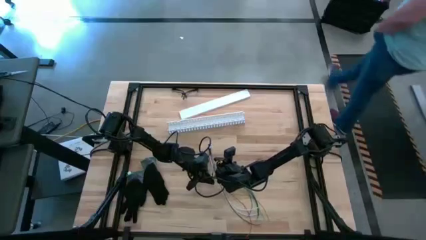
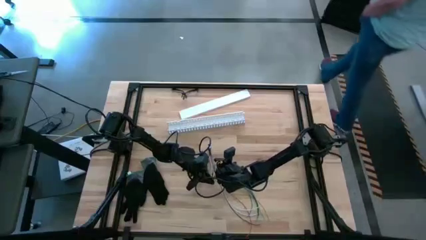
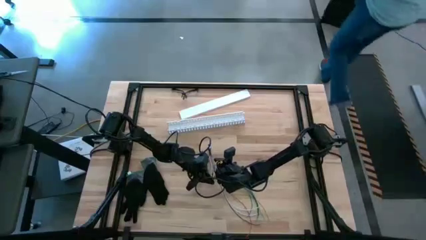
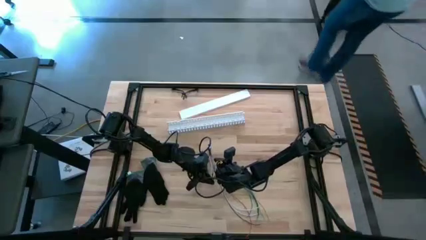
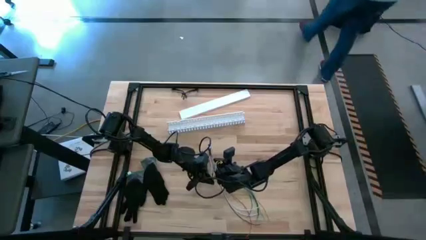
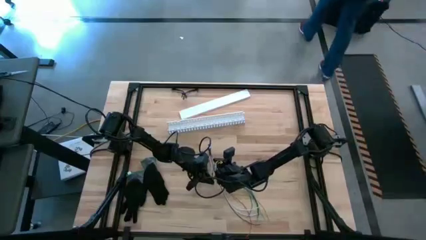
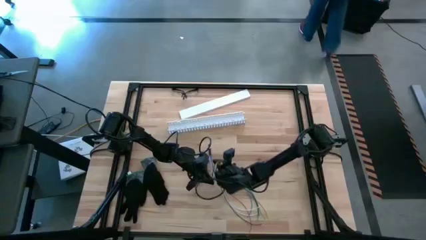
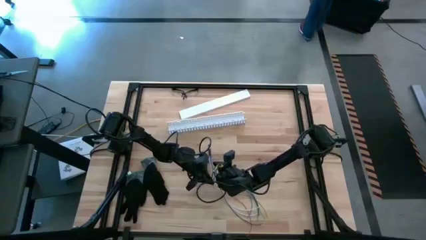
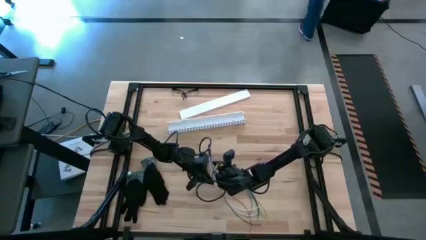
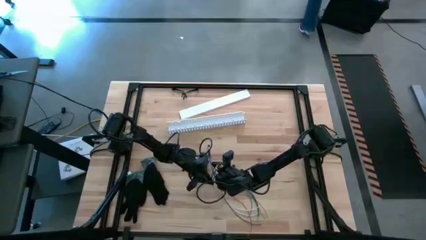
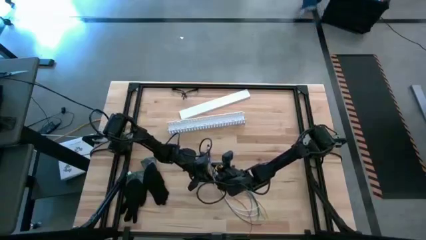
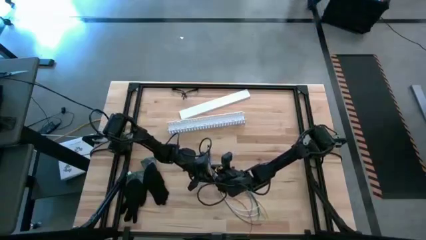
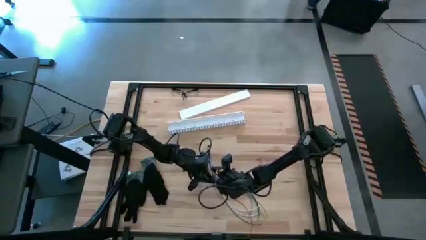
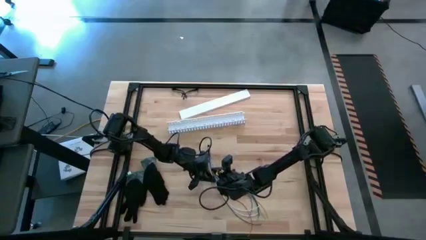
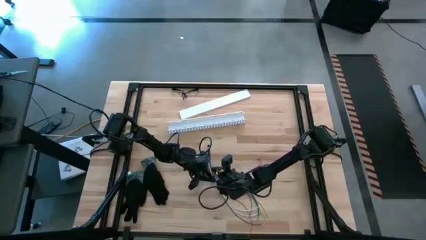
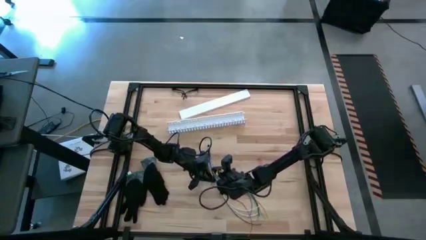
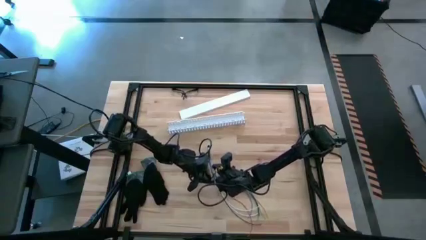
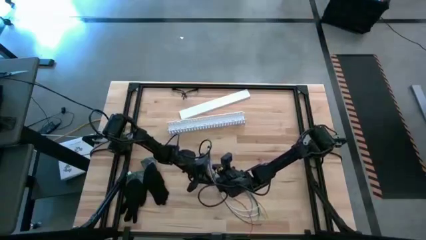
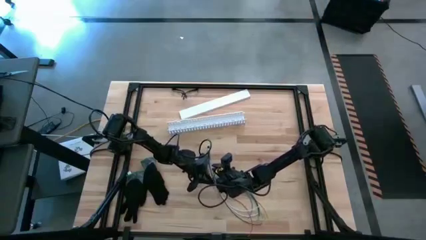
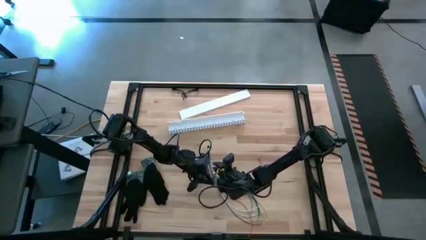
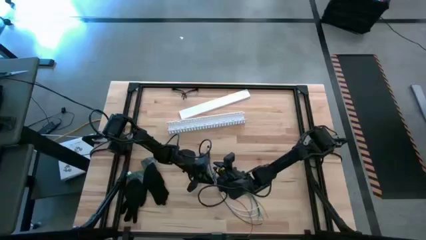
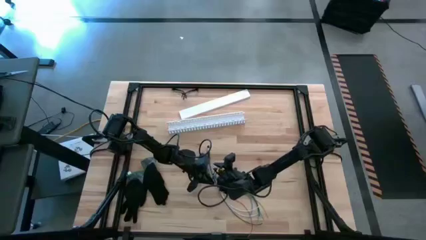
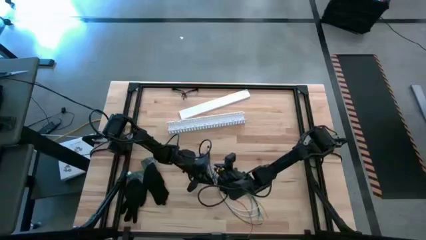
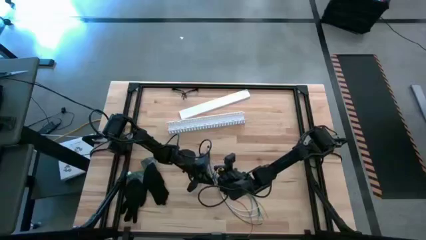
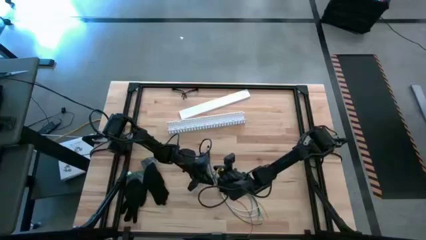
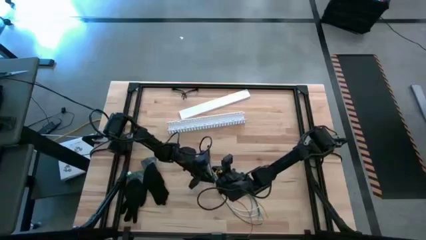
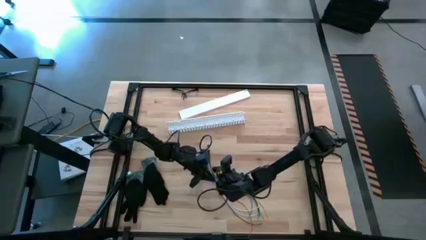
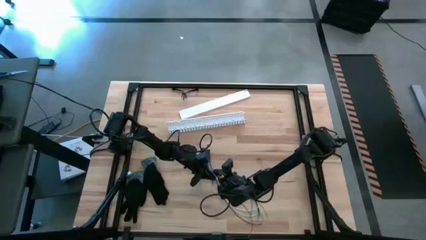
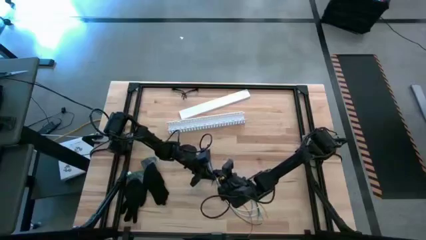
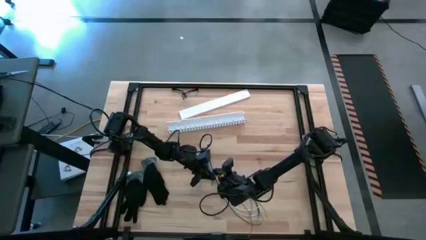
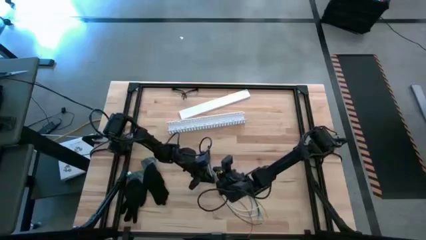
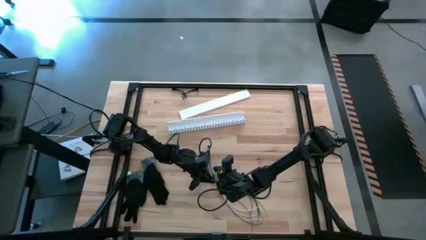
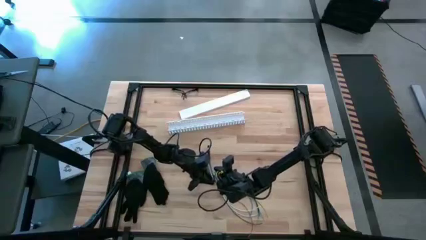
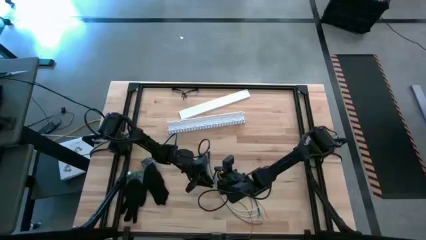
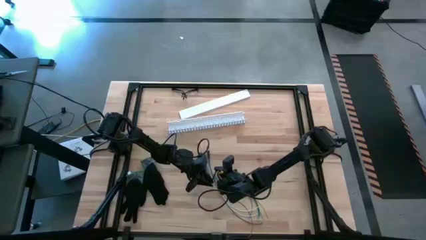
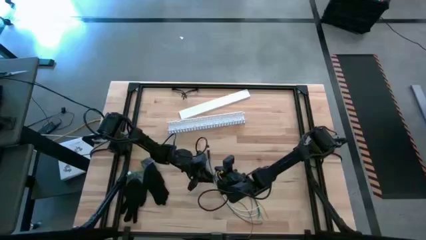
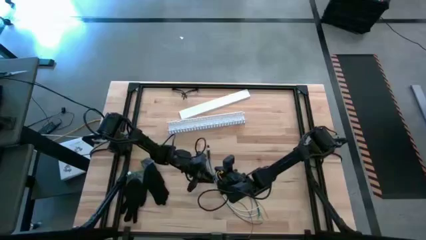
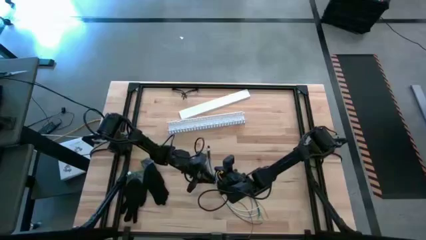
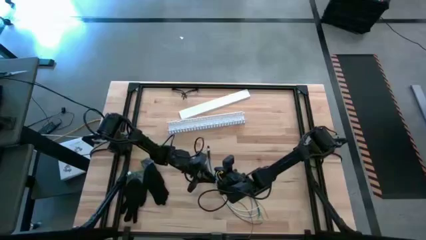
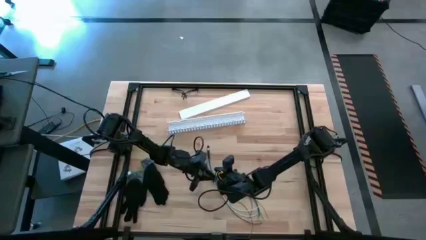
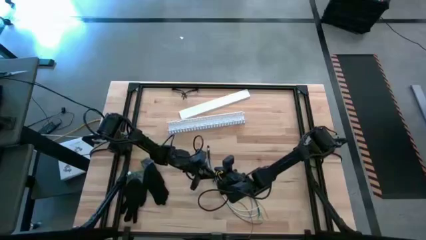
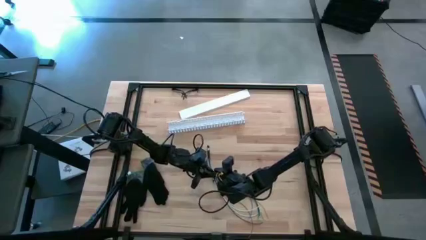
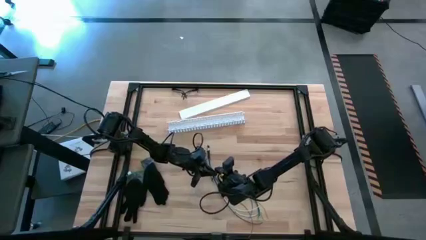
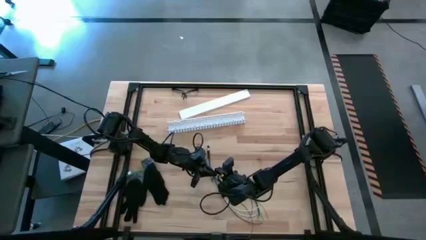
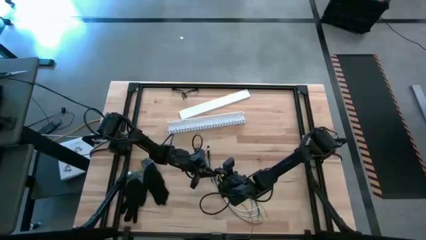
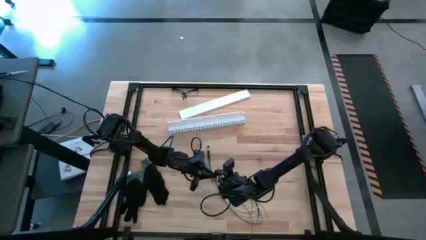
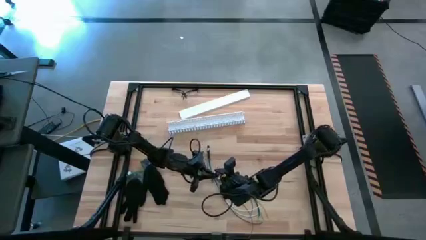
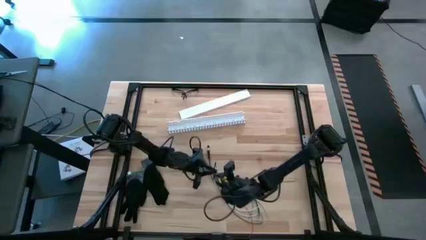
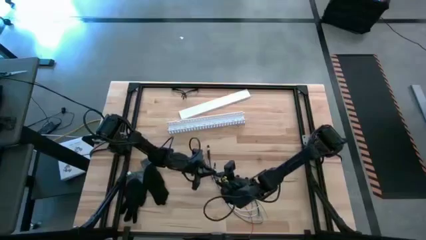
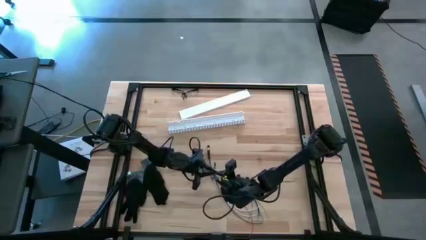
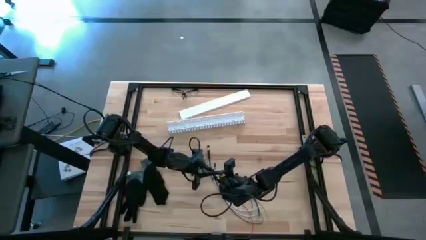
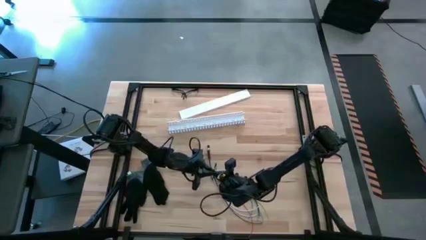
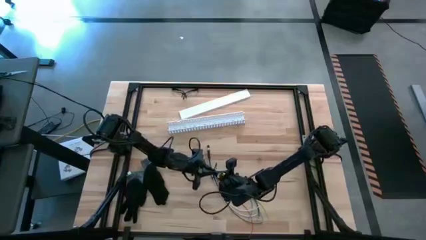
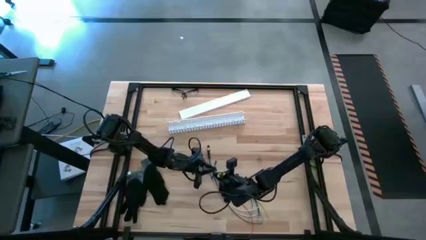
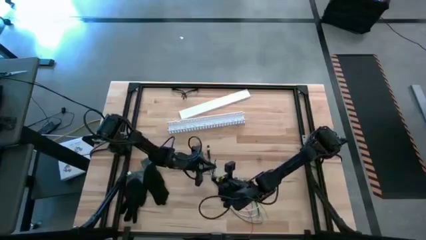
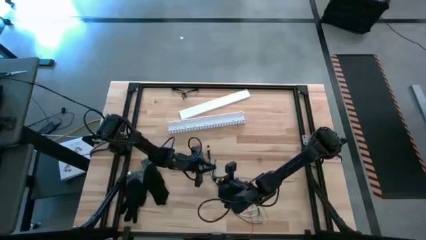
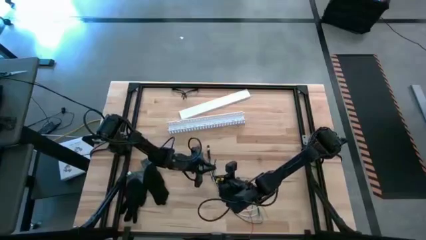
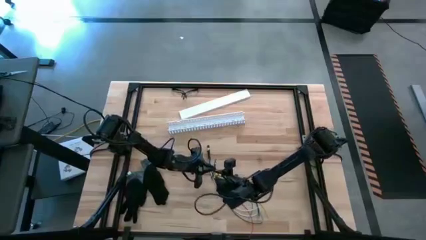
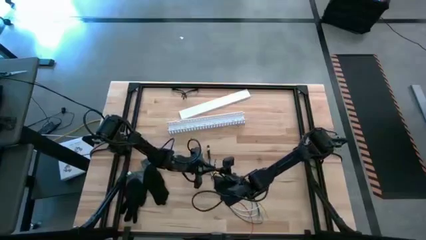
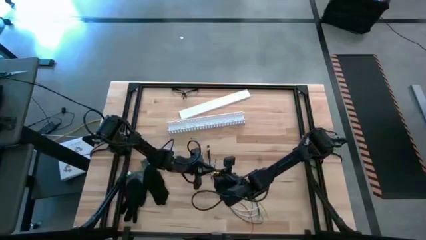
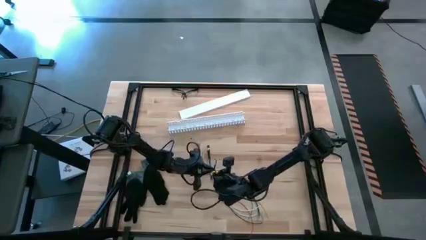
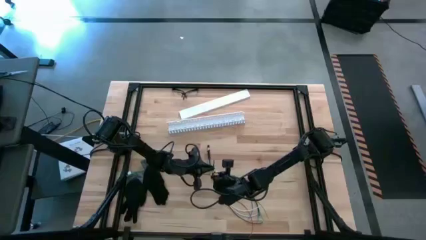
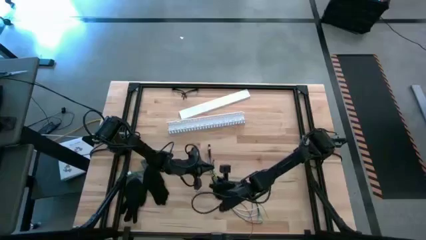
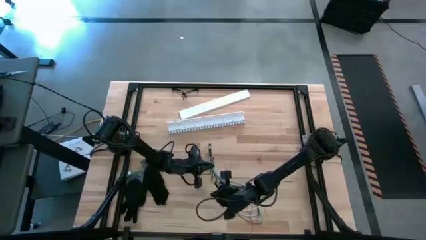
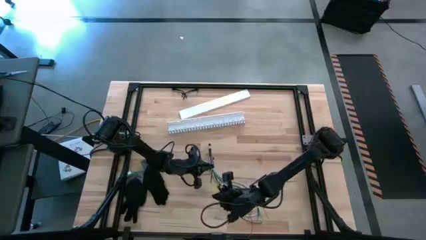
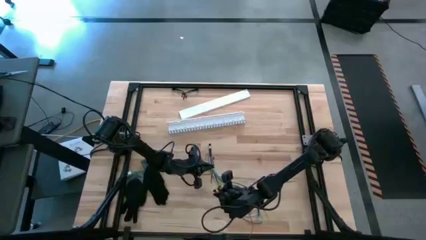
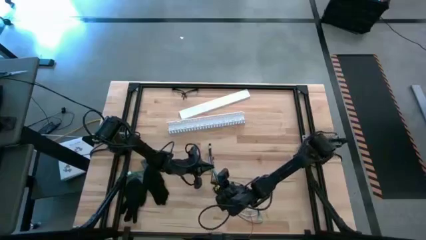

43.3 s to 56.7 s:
Task: Ziptie cables
Wrap the black zip tie on the cable

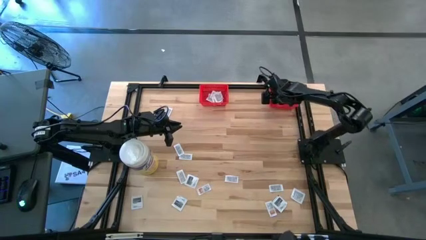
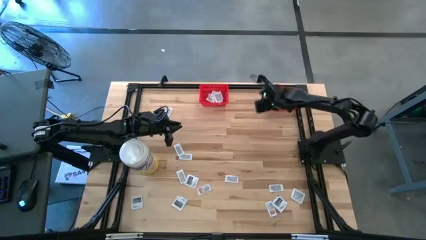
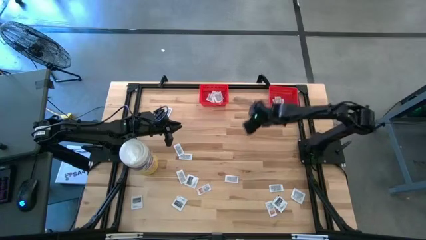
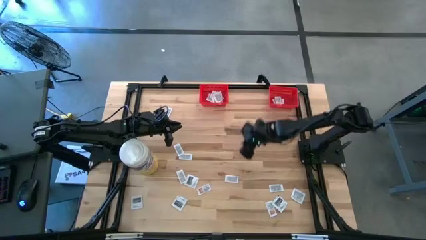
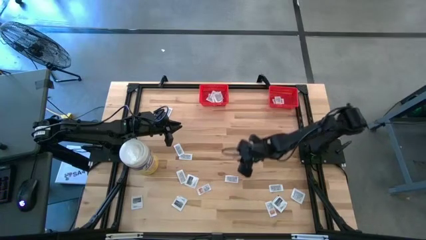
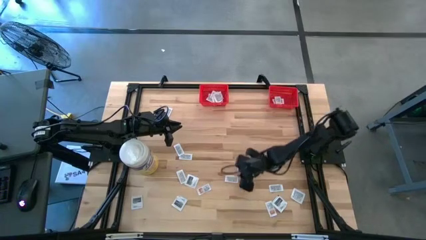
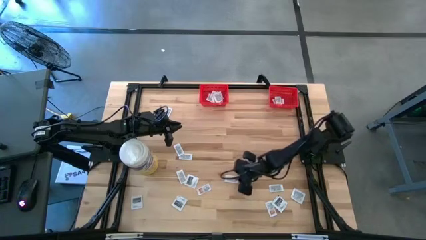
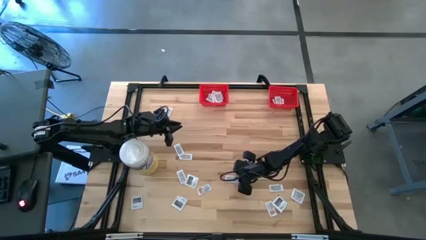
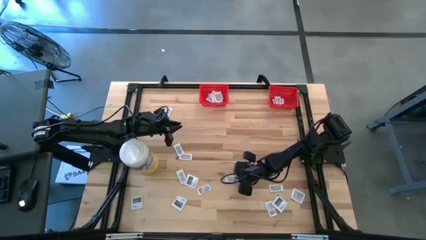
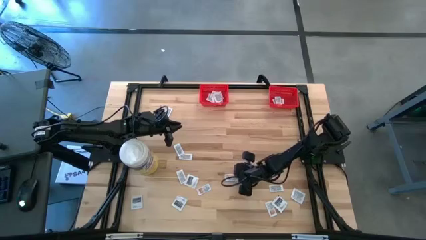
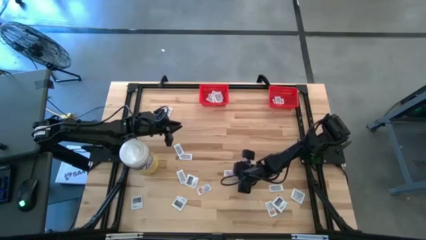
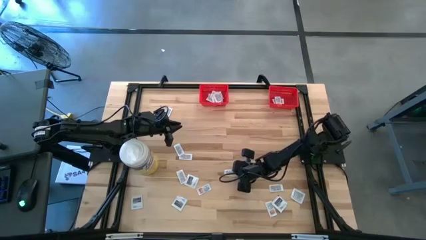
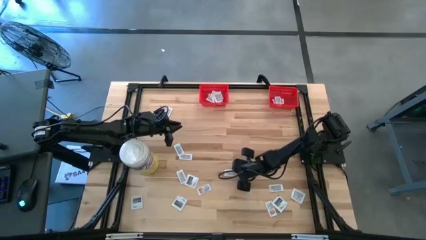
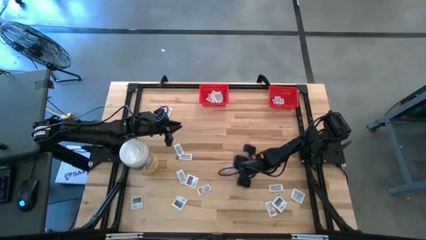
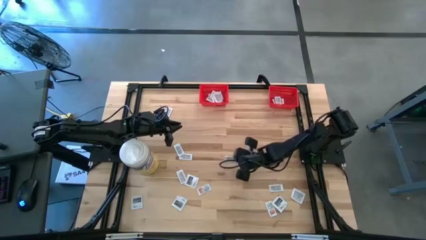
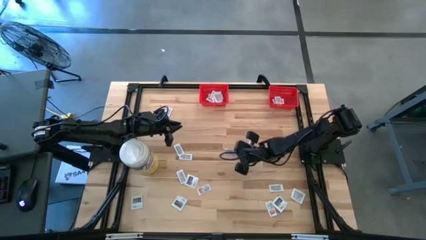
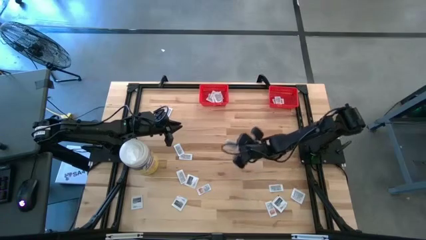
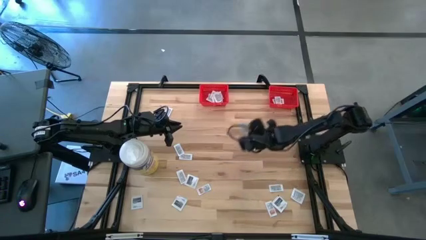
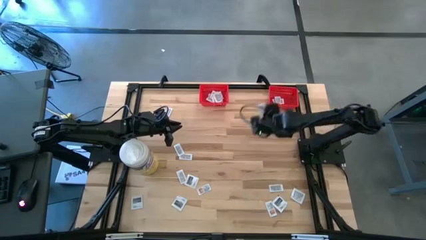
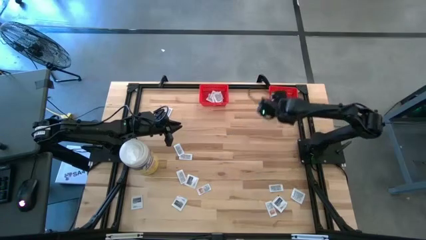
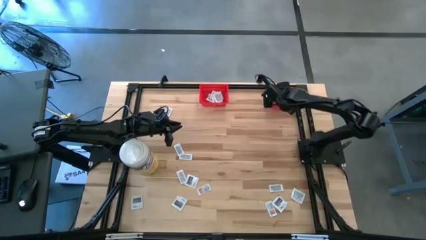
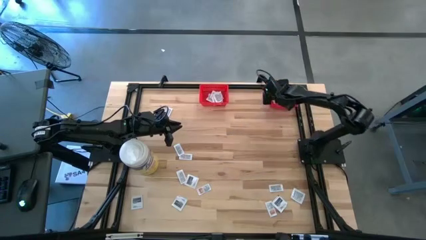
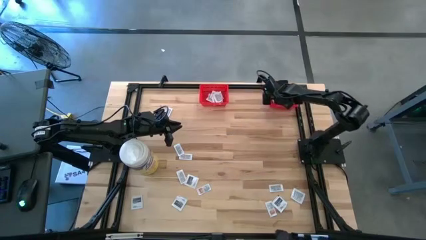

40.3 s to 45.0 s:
Task: Pick & Place First Aid Supplies
Put the ointment pack into the right red bin
